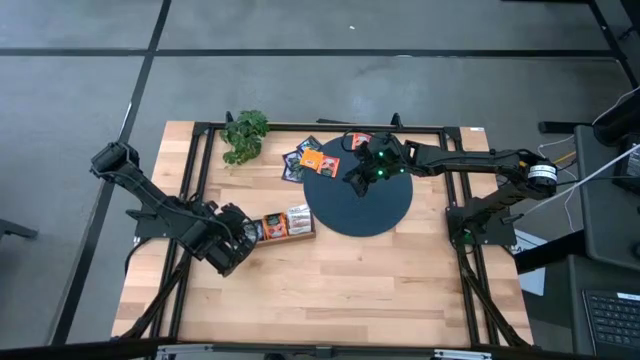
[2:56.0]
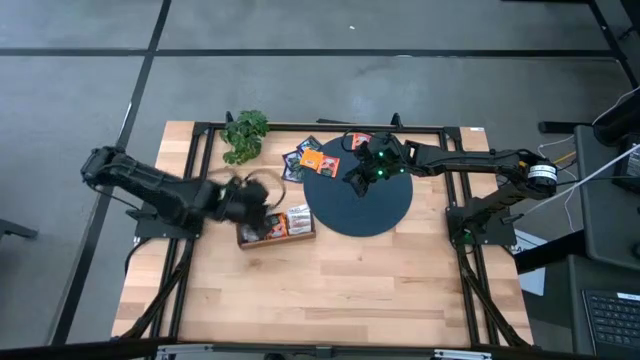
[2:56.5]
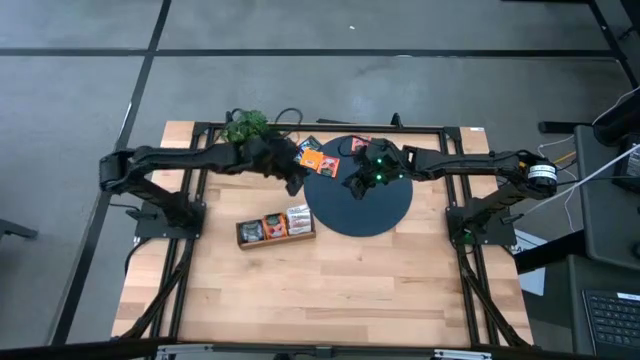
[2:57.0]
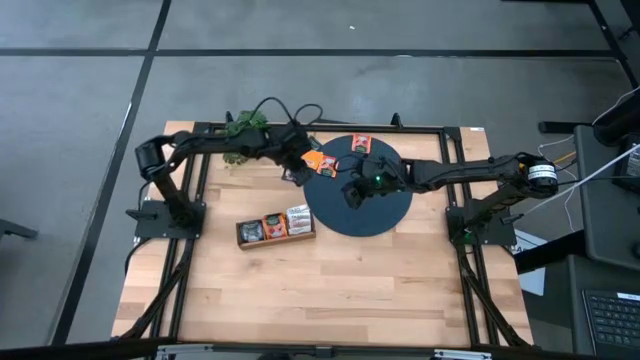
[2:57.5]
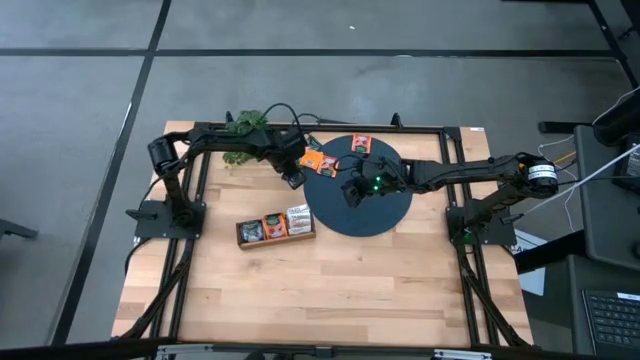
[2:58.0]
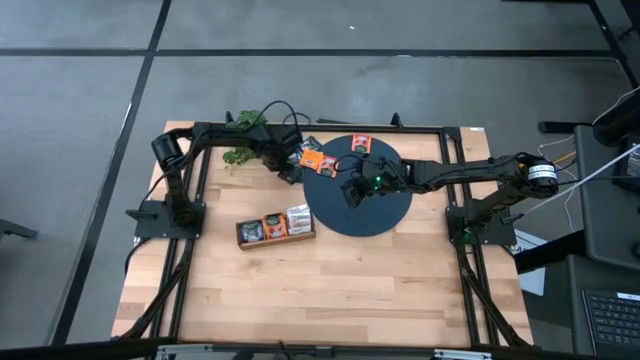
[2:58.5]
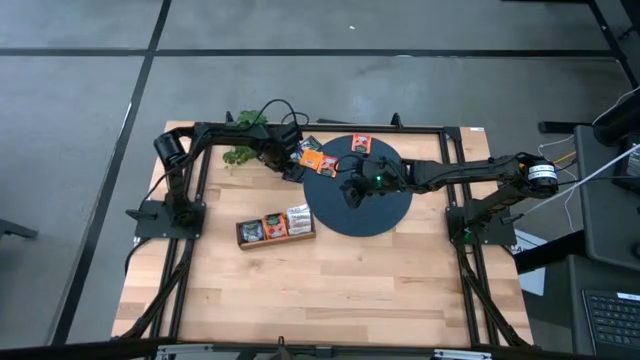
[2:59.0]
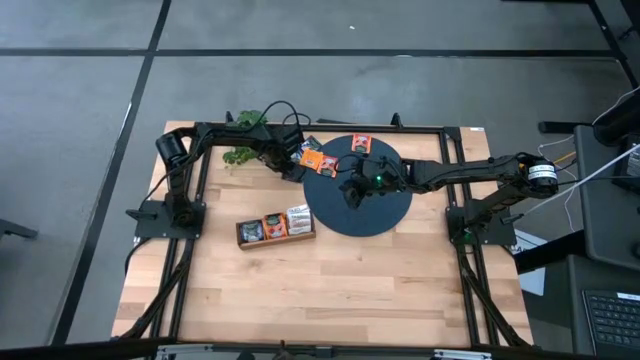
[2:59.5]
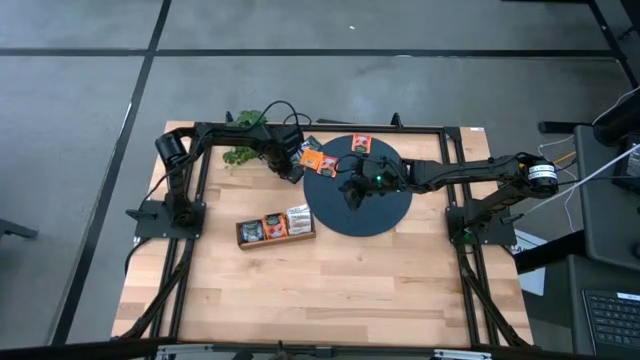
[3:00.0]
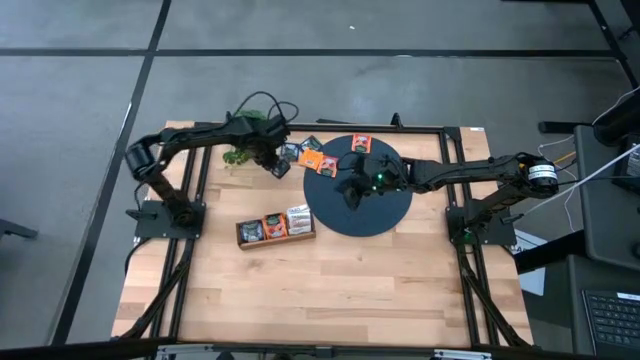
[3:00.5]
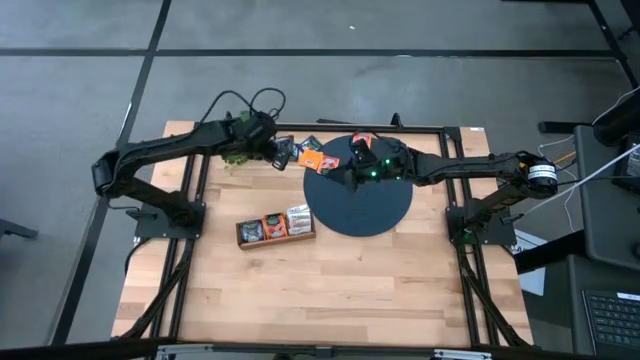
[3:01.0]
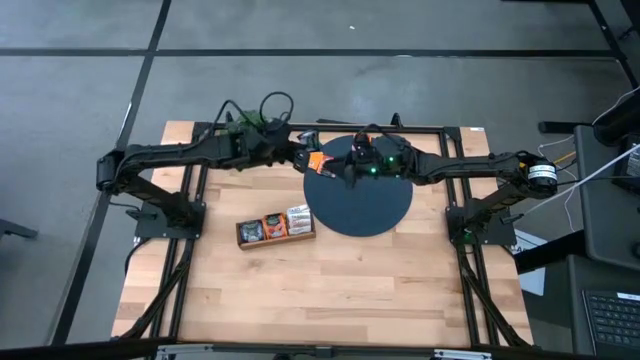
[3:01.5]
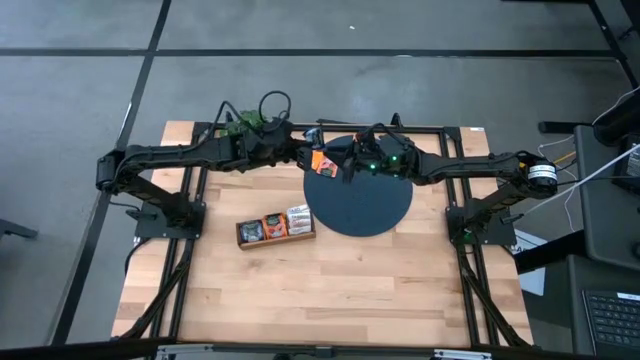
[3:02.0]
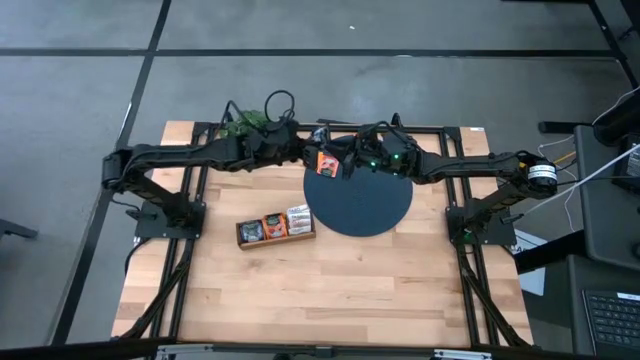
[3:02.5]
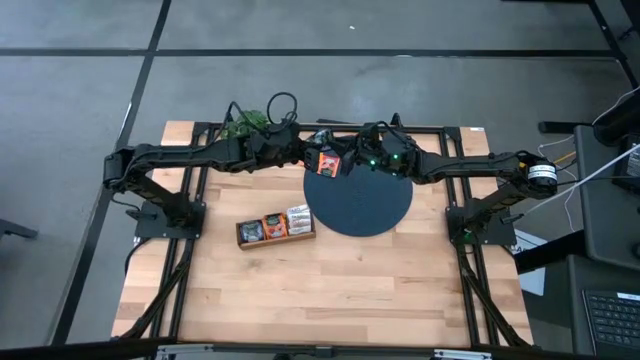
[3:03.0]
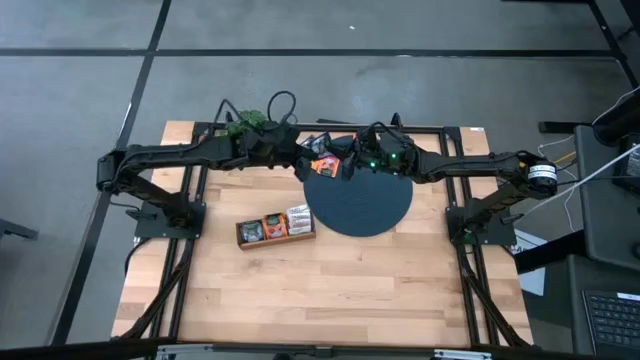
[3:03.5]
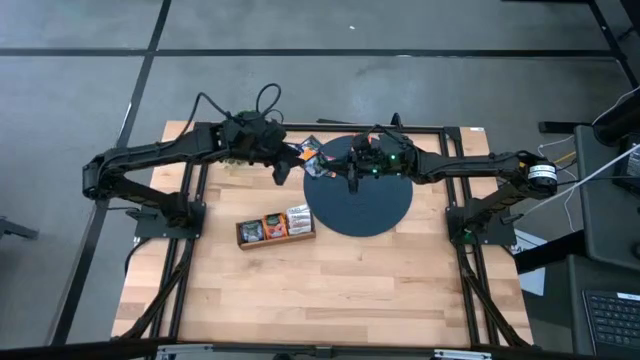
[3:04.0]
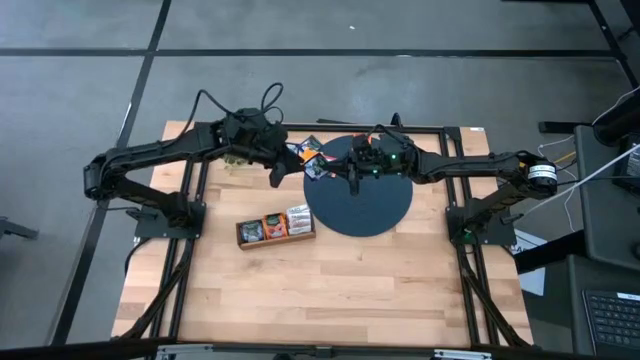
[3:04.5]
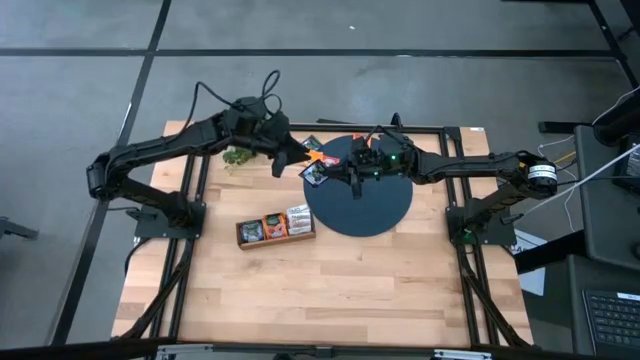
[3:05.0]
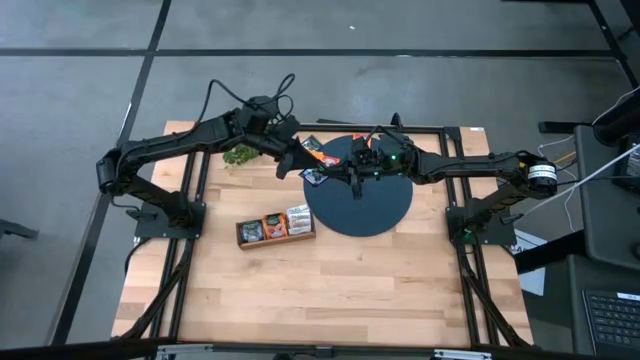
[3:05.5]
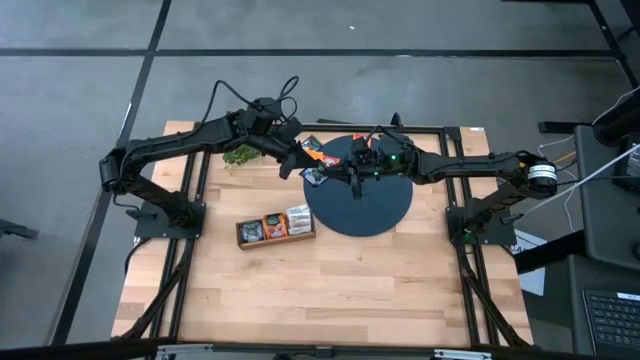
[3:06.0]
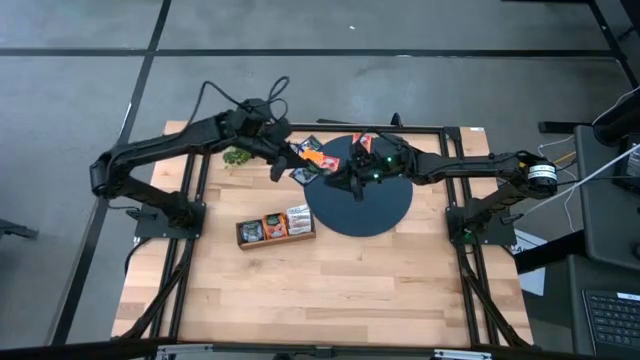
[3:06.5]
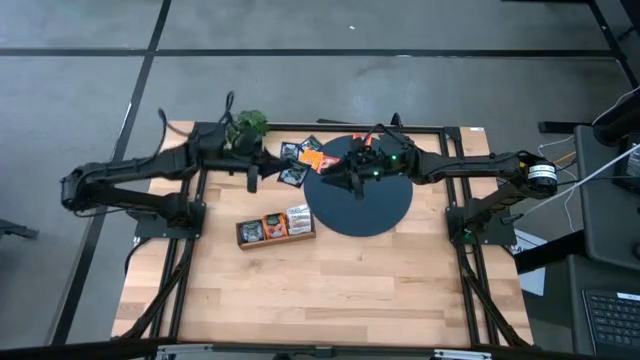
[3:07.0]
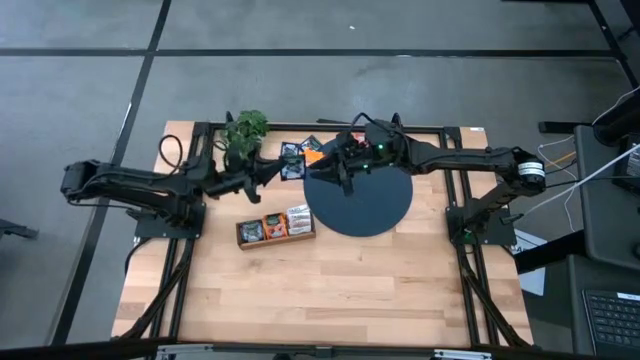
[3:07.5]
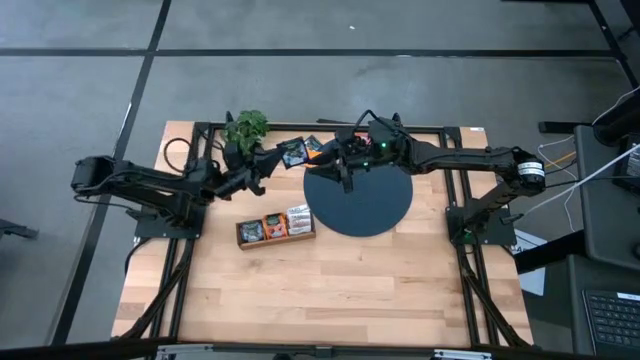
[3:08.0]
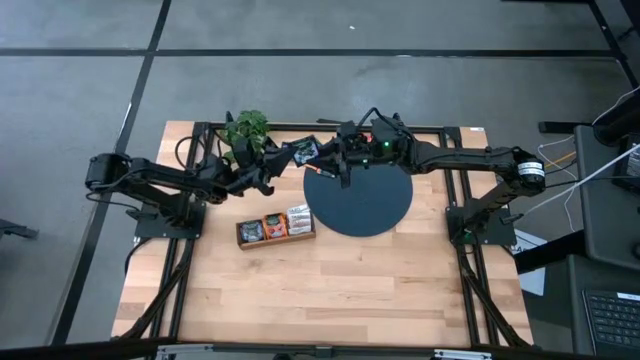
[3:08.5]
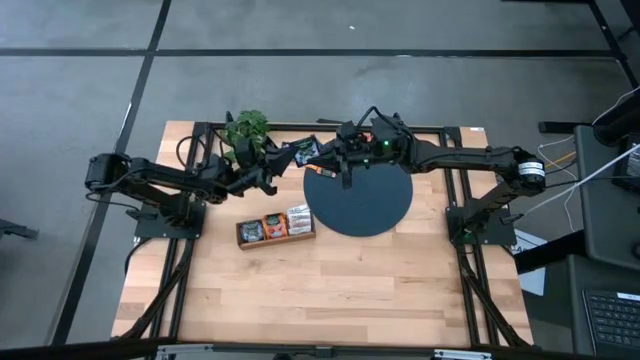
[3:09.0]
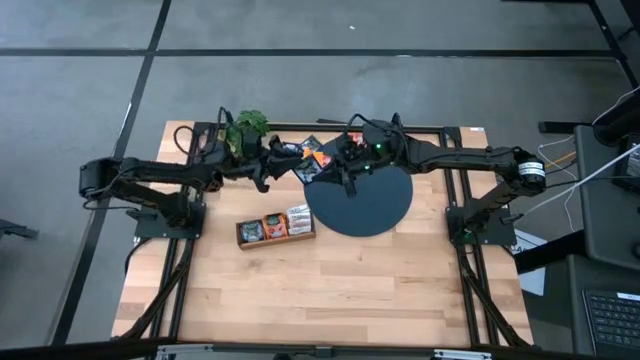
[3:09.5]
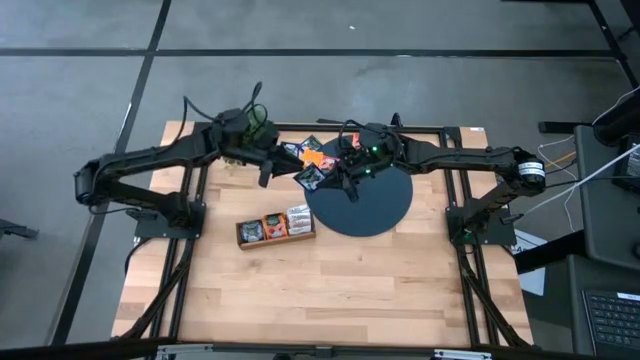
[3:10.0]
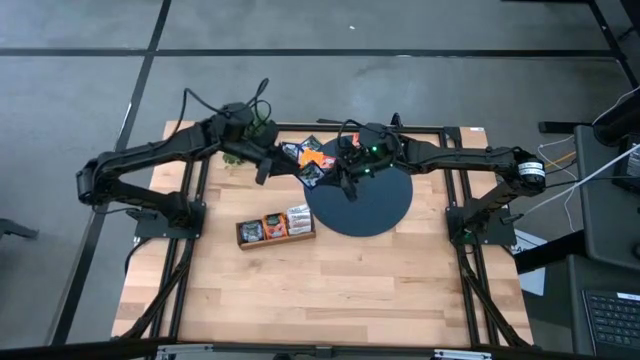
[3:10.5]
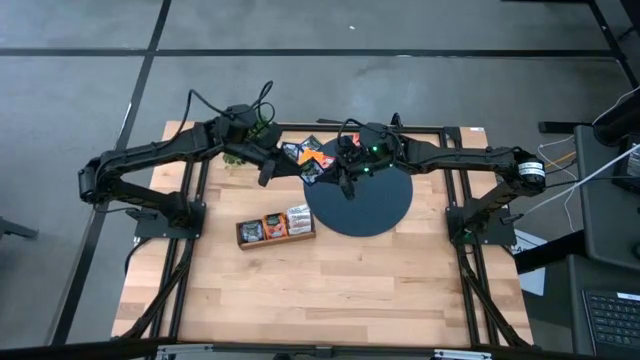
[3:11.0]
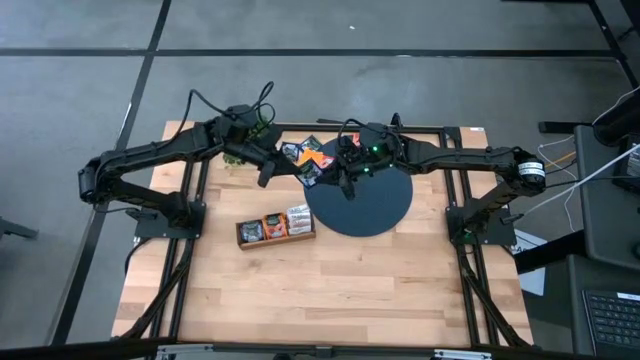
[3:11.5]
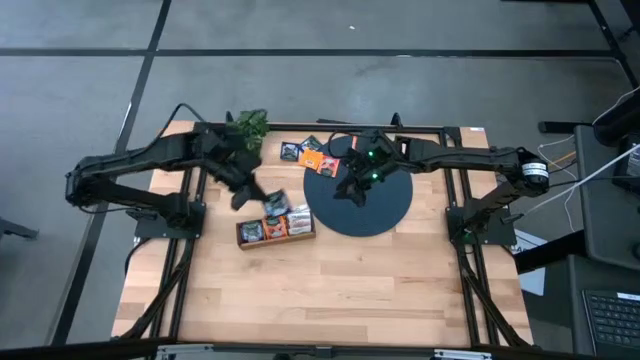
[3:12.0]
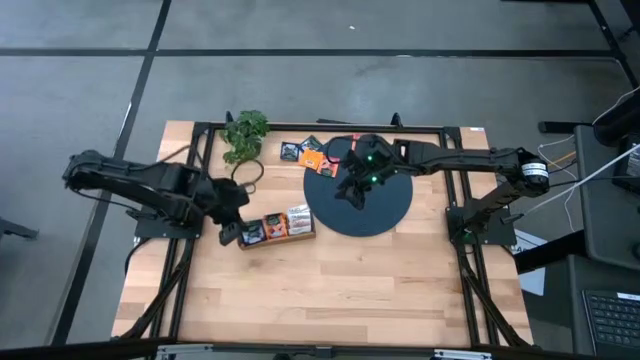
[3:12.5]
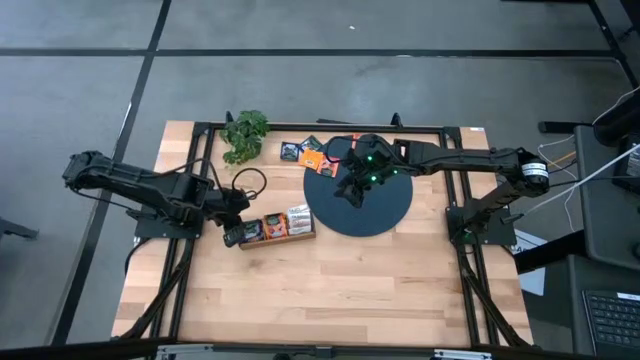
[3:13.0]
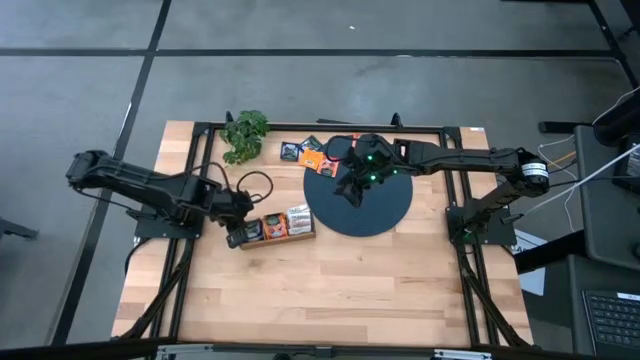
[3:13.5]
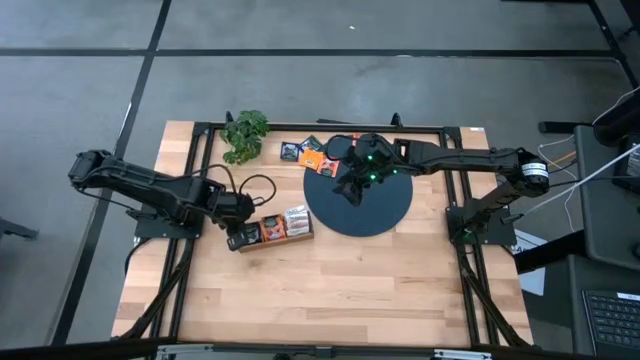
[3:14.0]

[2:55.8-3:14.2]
Task: Pick & Place Tea
Put the purple tea bag into the left section of the wooden organizer

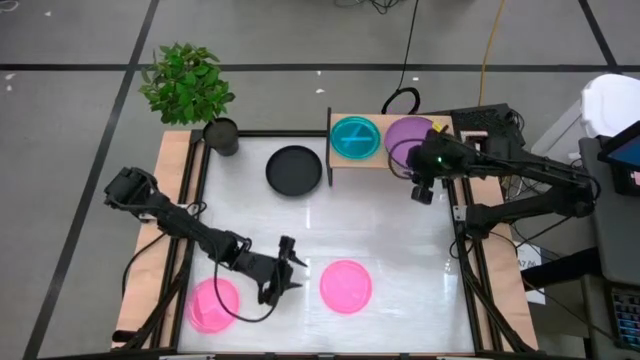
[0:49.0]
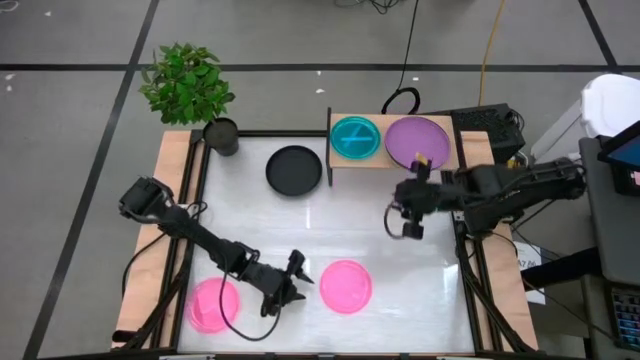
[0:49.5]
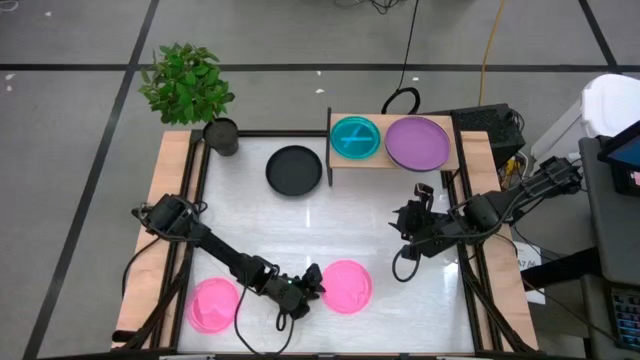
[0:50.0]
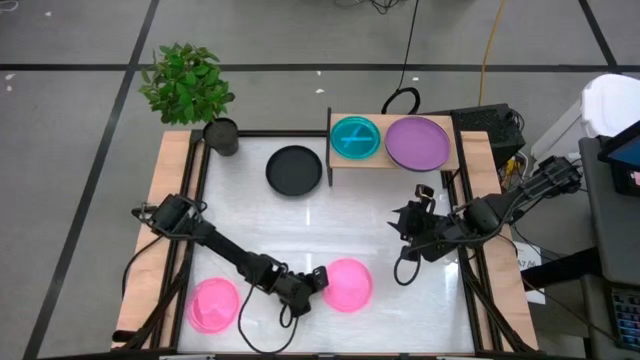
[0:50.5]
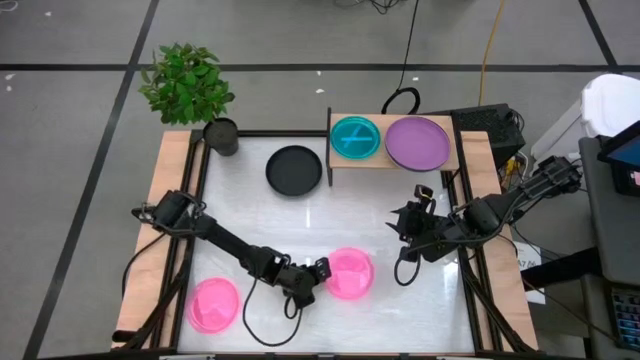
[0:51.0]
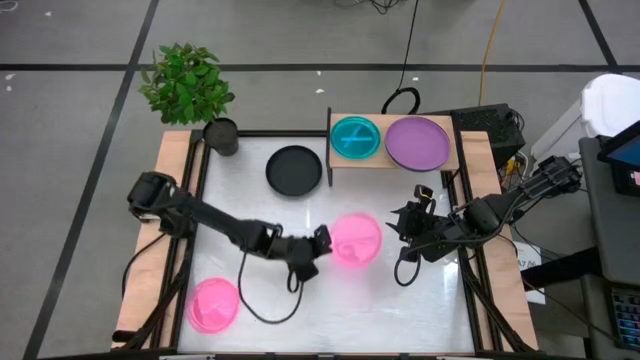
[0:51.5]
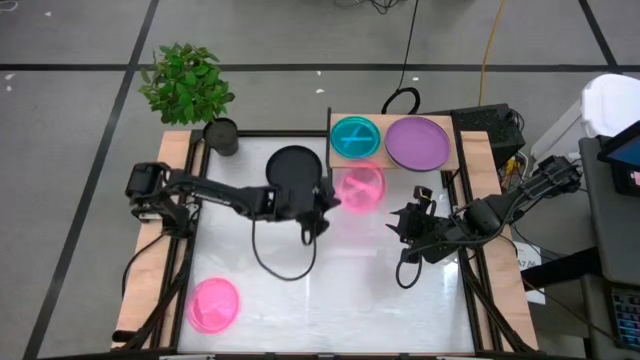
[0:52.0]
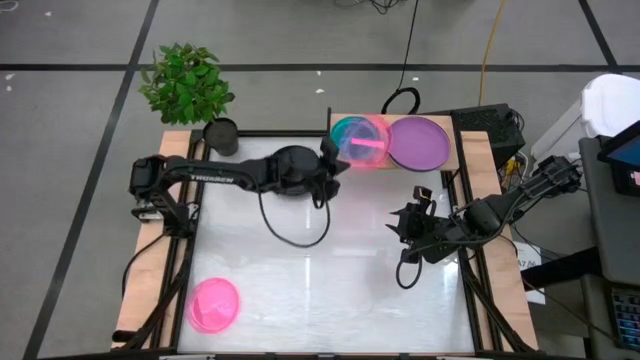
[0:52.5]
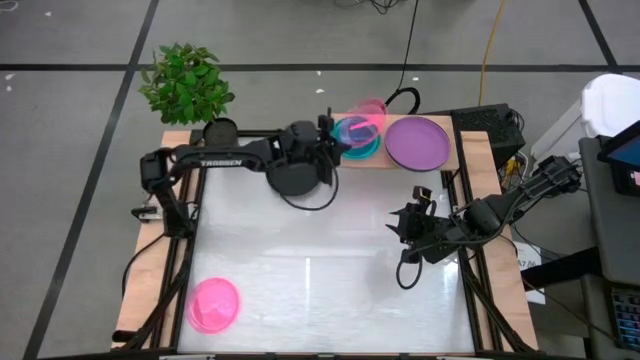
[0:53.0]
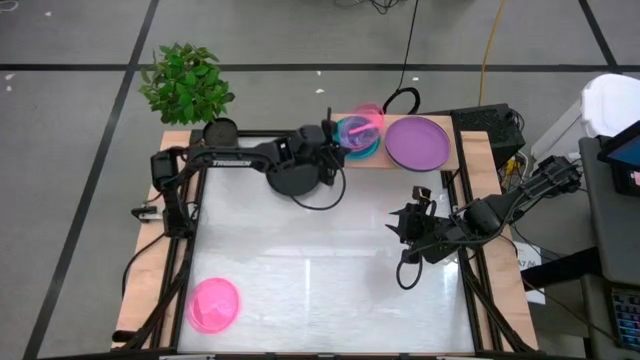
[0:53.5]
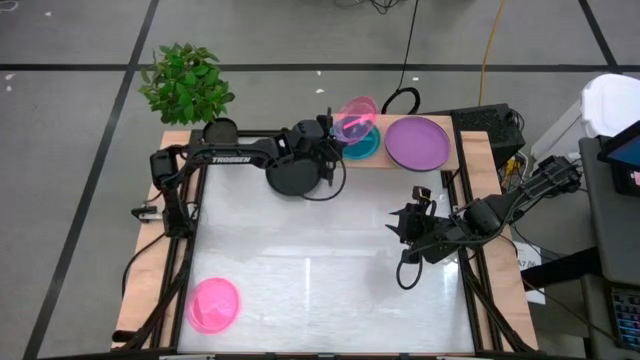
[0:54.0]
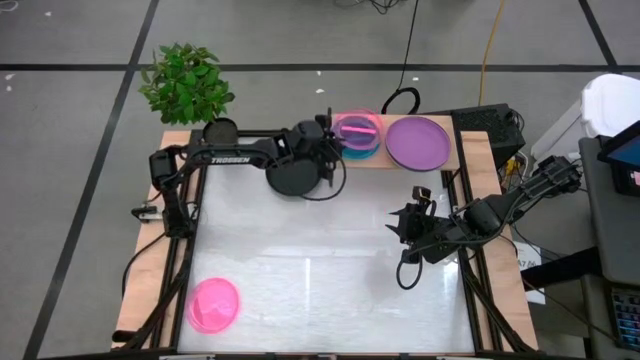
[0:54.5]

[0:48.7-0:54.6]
Task: Place and stack plates onto a shelf
Stack the right small pink plate on top of the small blue plate on the shelf
